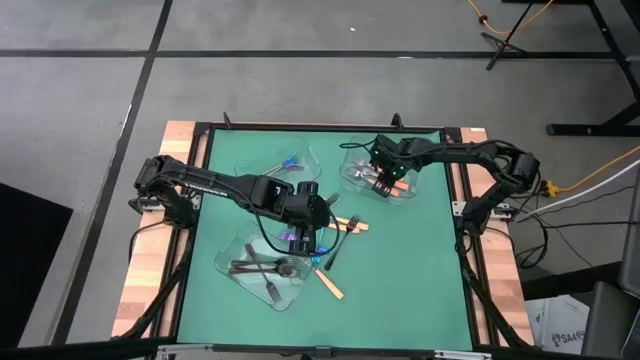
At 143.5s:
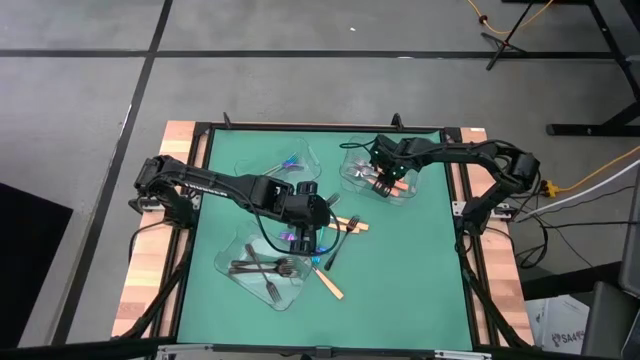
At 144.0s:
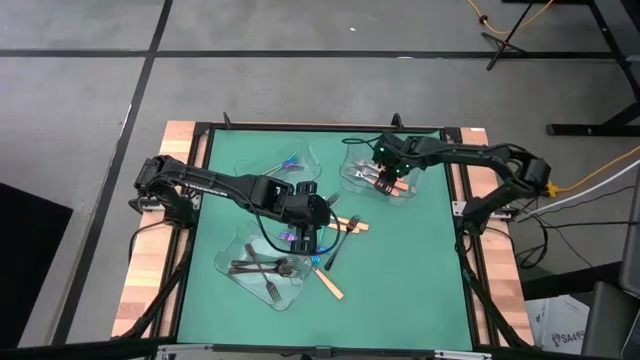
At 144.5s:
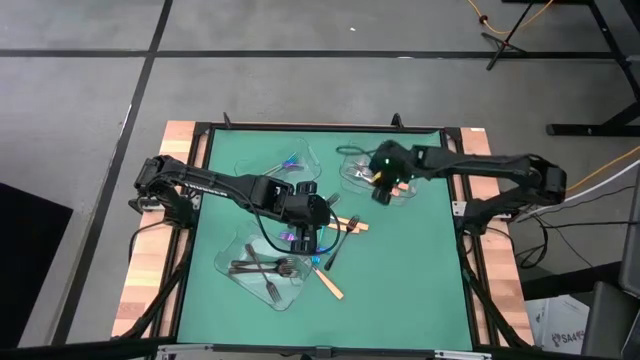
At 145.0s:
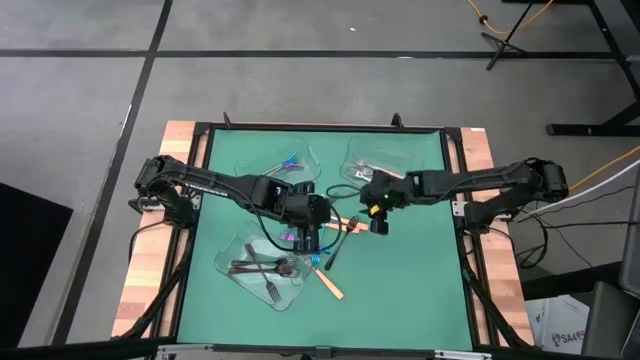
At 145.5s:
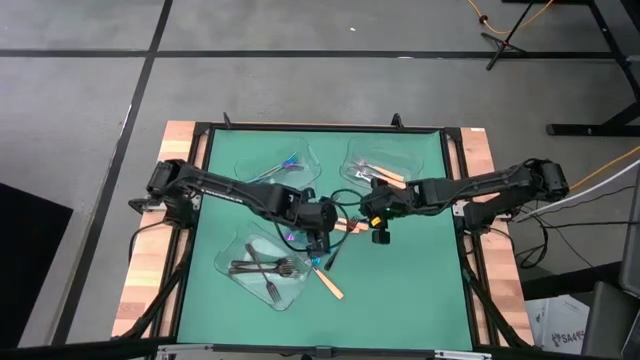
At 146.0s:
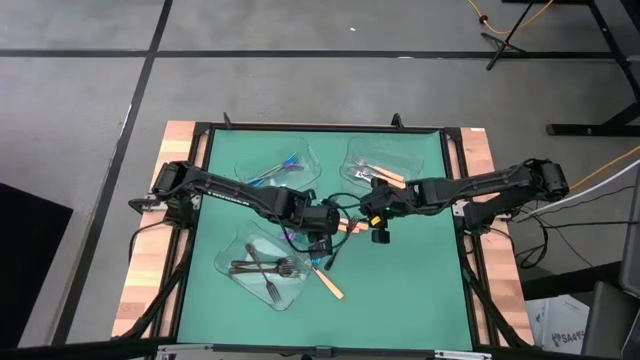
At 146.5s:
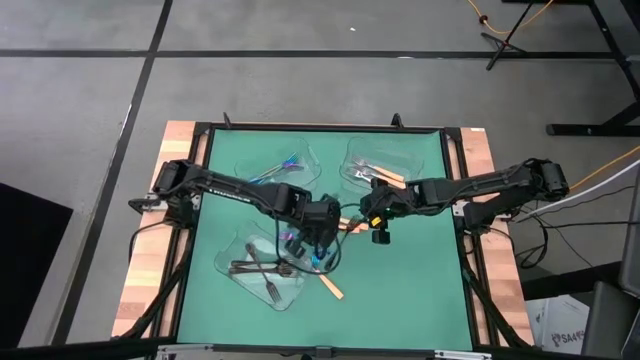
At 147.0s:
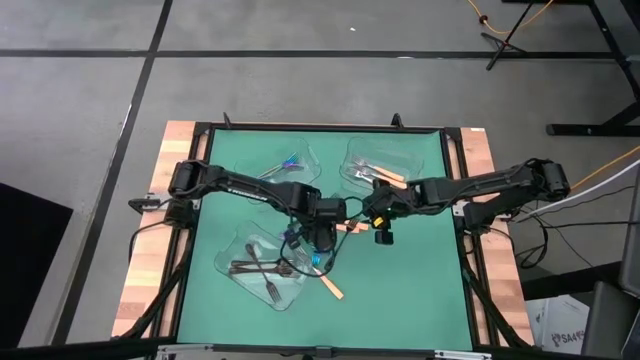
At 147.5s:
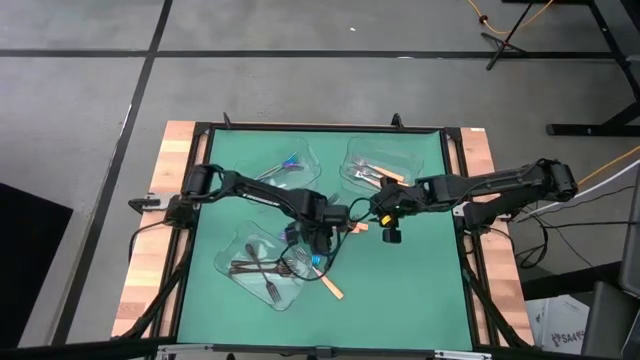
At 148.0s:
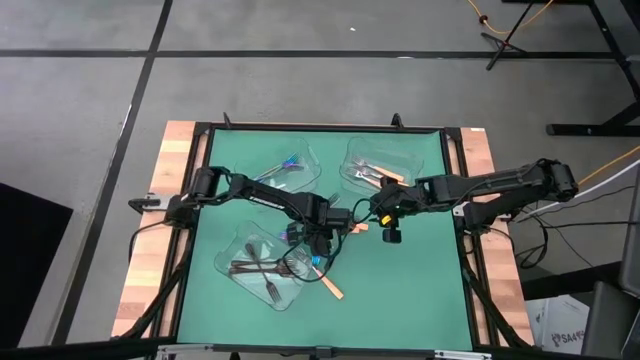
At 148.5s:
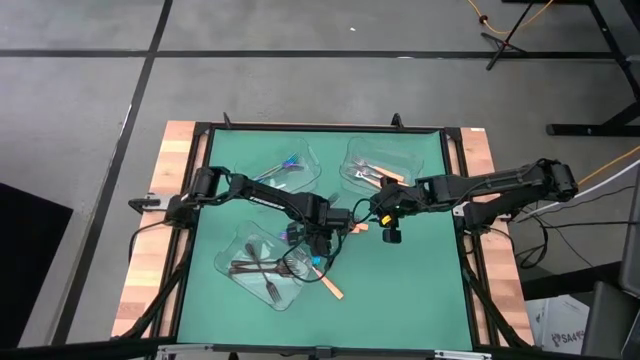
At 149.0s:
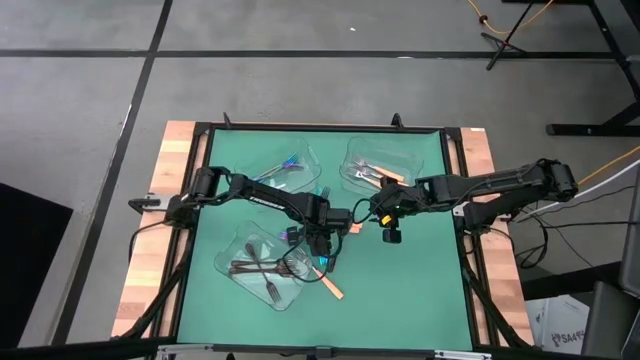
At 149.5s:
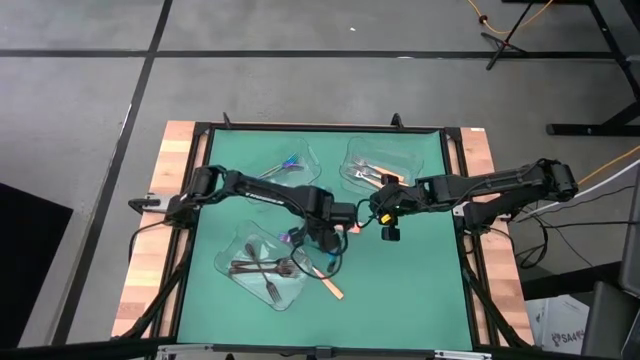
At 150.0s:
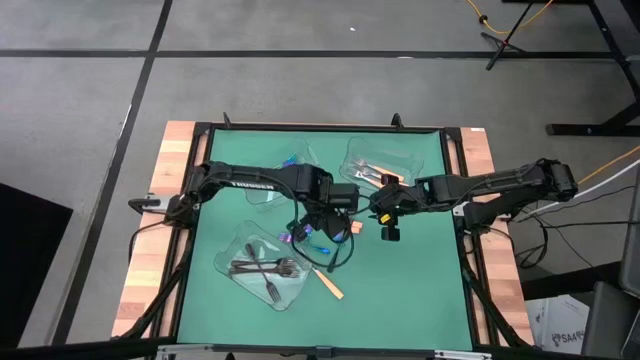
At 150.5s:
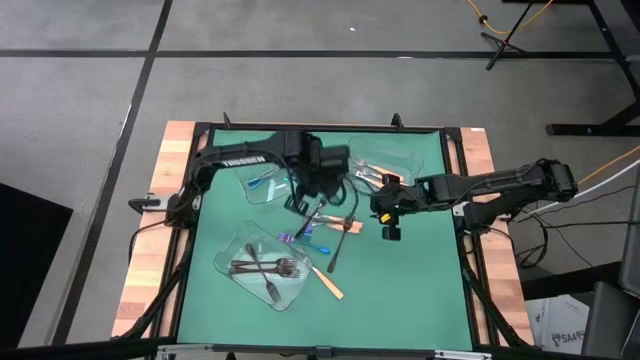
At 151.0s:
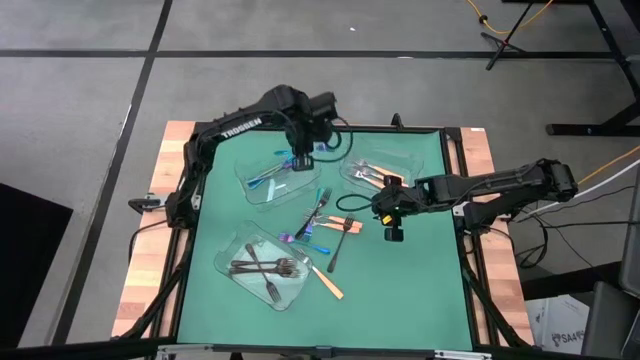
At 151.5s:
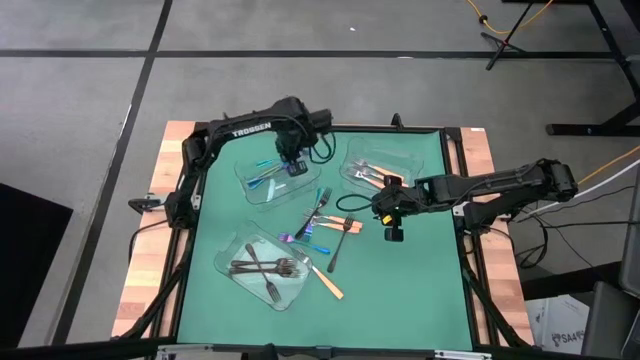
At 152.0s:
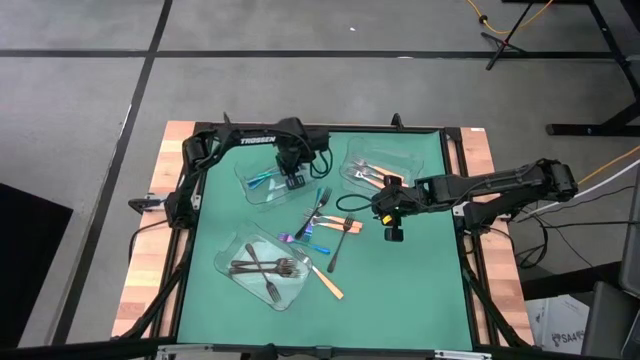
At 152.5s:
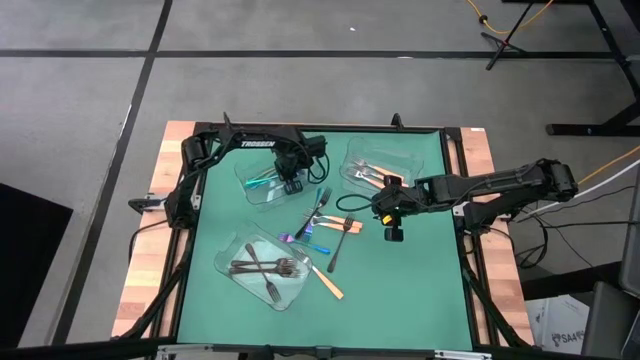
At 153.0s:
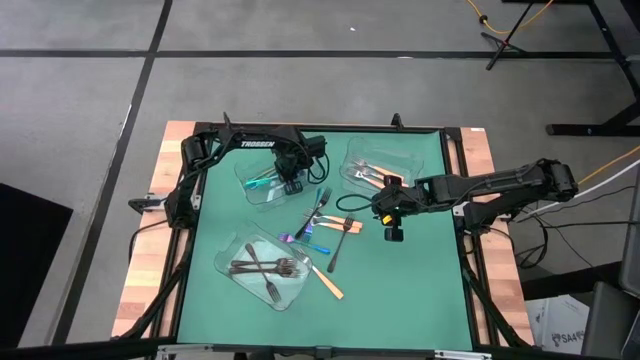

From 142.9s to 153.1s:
Task: Sort silverware by color (type)
Put the blue fork into the top left transparent bin

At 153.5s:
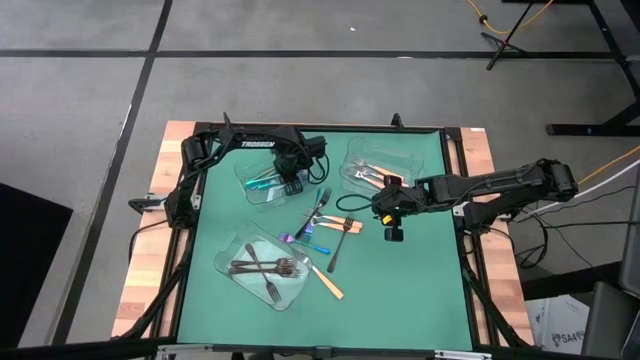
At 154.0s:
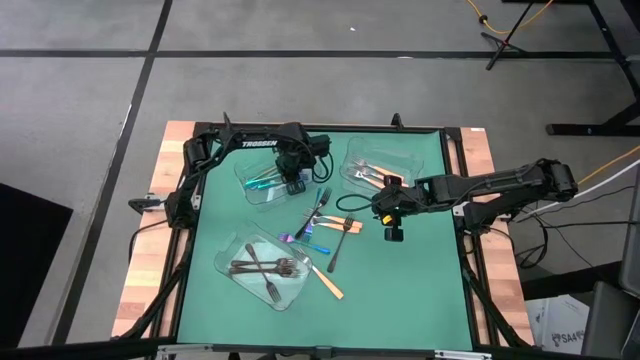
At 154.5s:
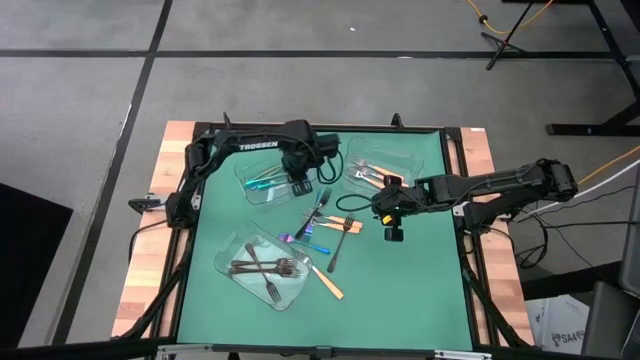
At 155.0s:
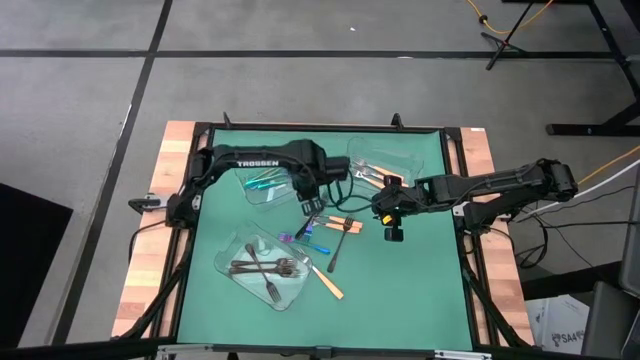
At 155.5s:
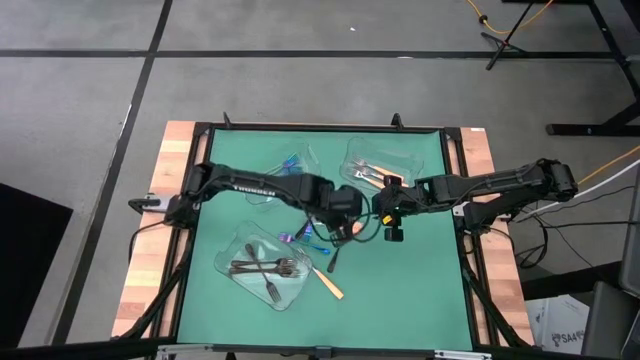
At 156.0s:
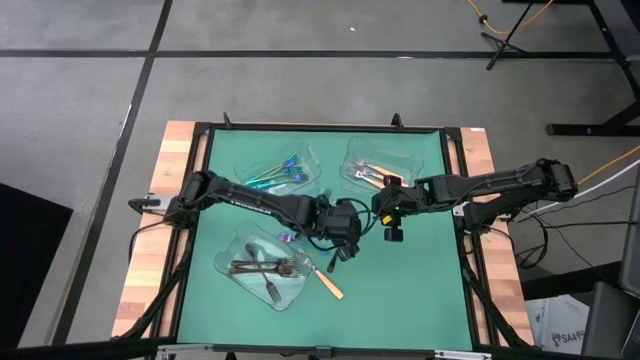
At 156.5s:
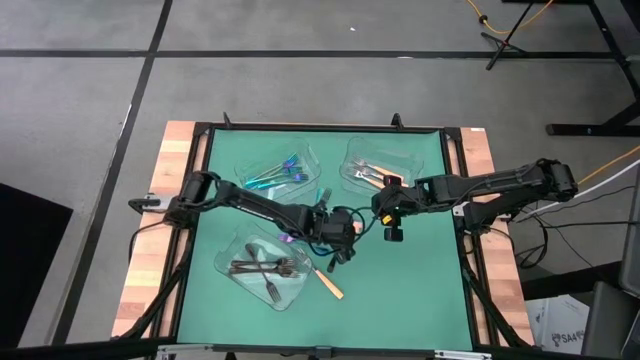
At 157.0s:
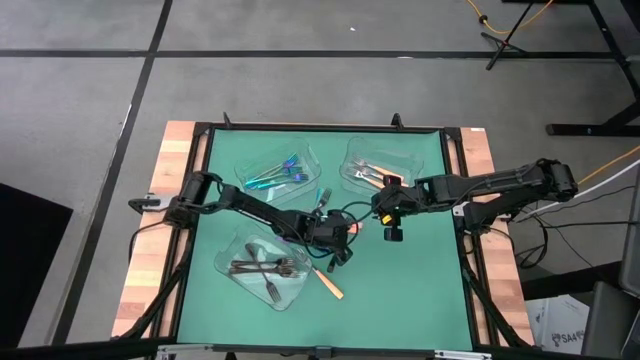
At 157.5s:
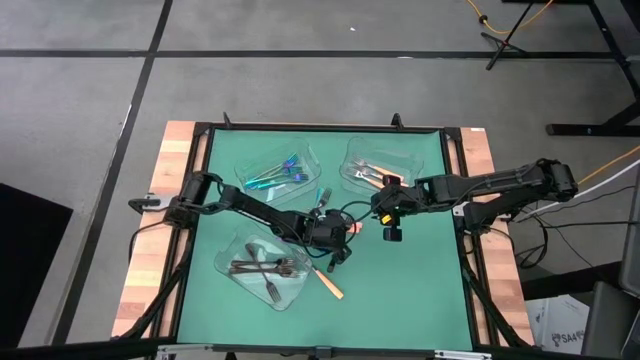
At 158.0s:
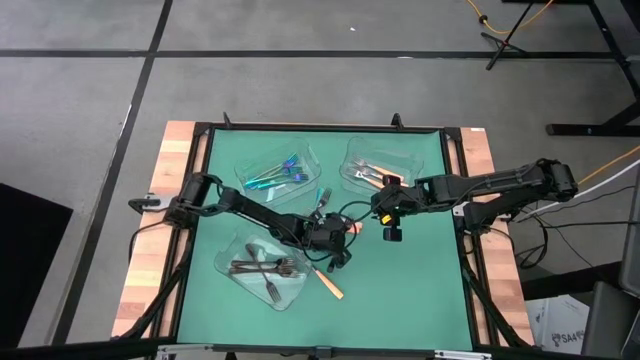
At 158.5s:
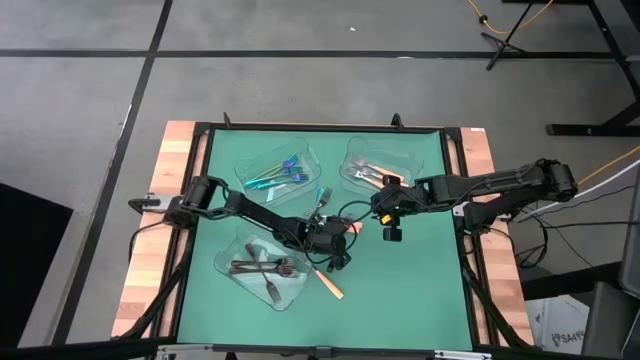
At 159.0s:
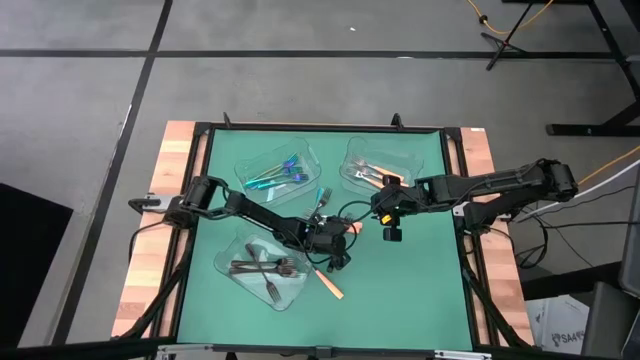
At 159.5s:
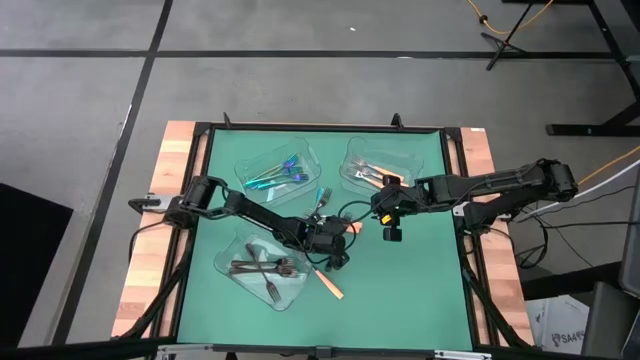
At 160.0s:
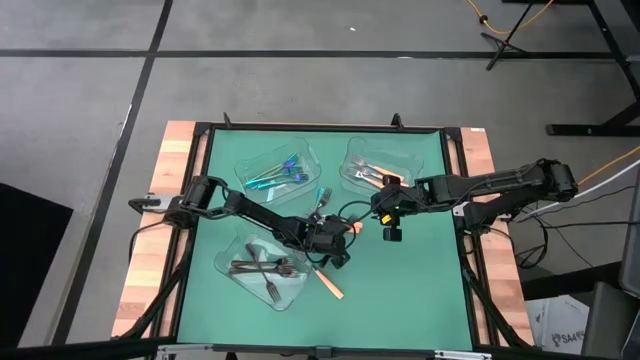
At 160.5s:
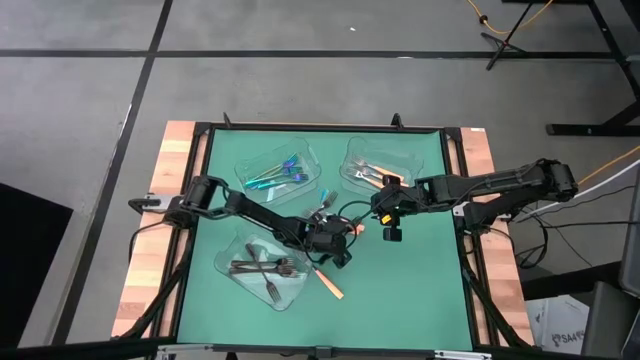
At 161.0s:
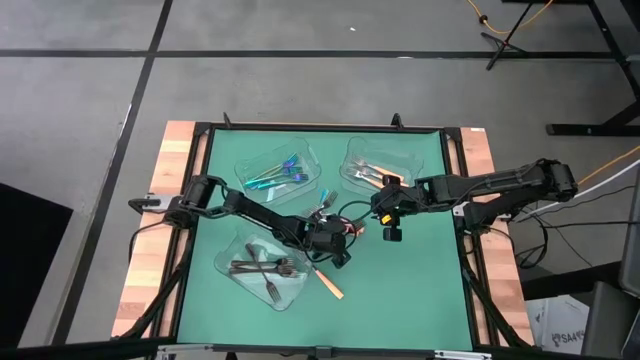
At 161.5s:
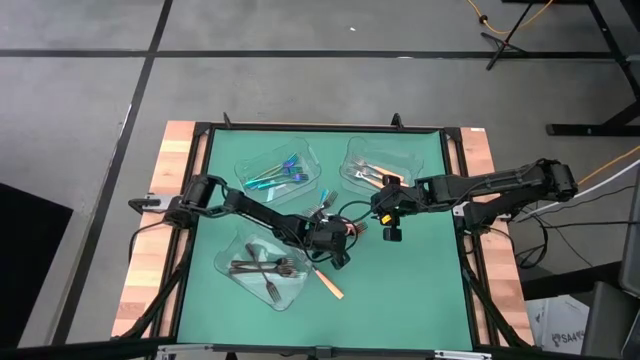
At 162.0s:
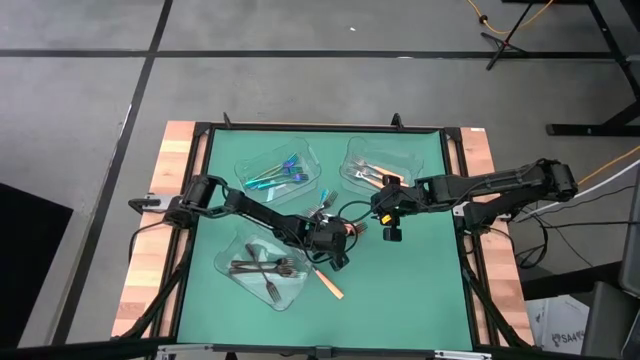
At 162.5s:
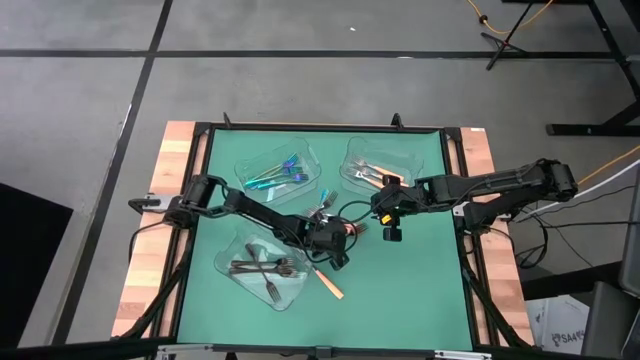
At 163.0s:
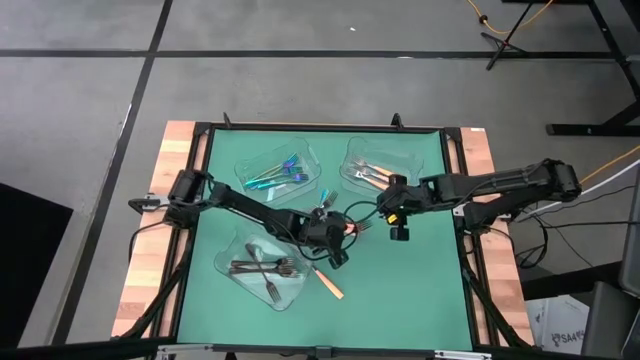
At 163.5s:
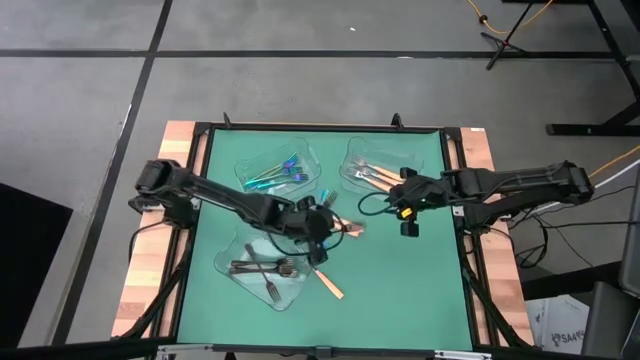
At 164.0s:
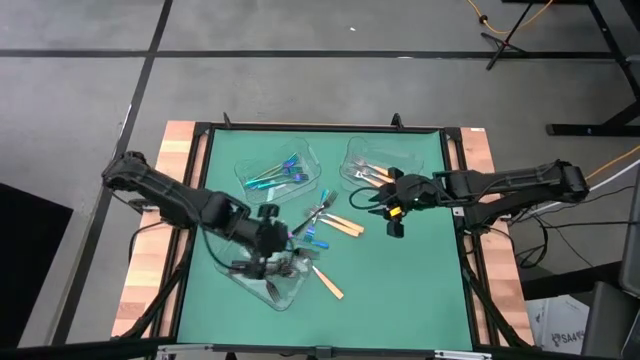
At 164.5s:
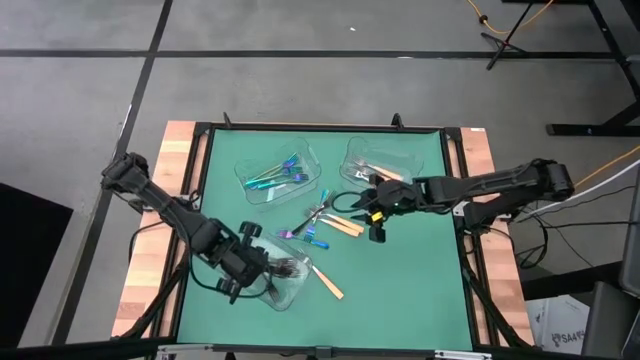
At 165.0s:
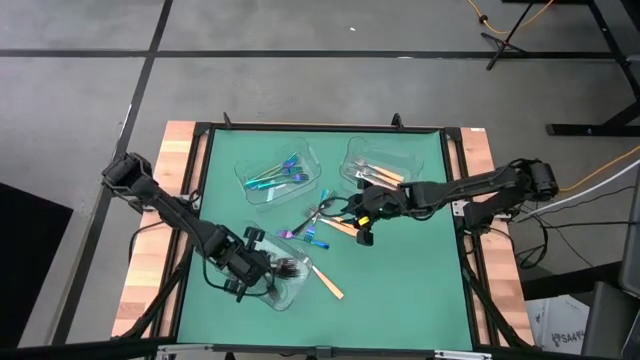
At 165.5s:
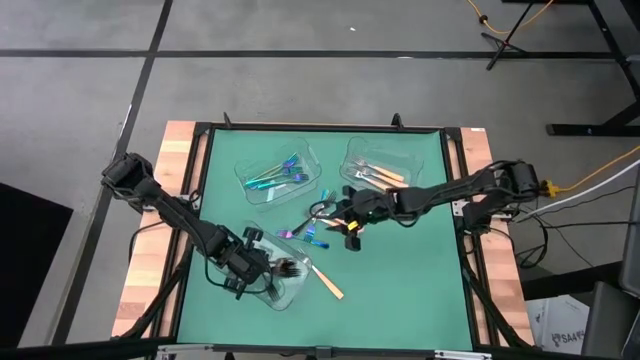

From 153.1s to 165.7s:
Put the black fork into the bottom transparent bin
